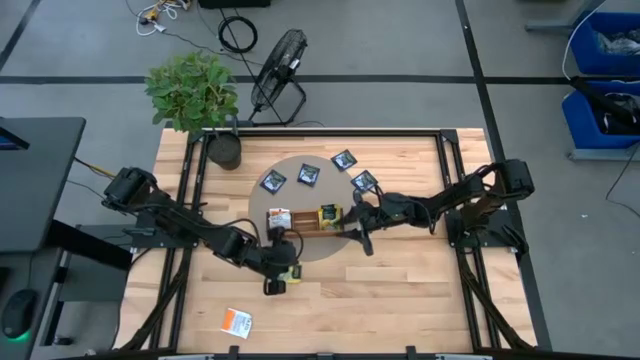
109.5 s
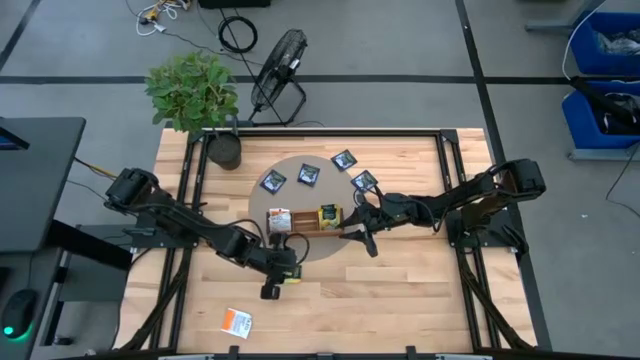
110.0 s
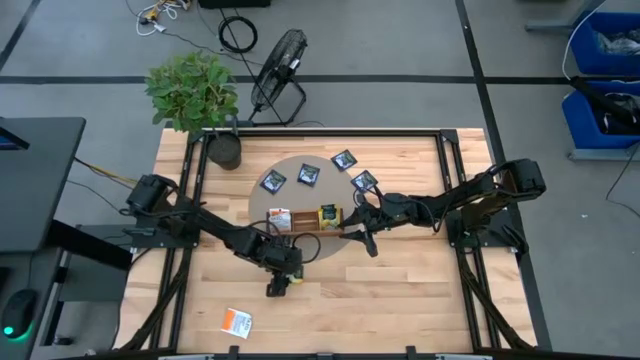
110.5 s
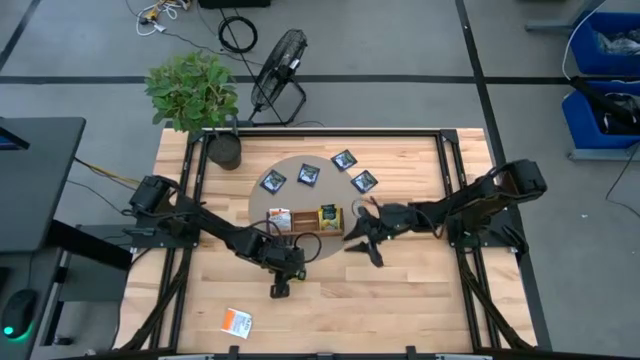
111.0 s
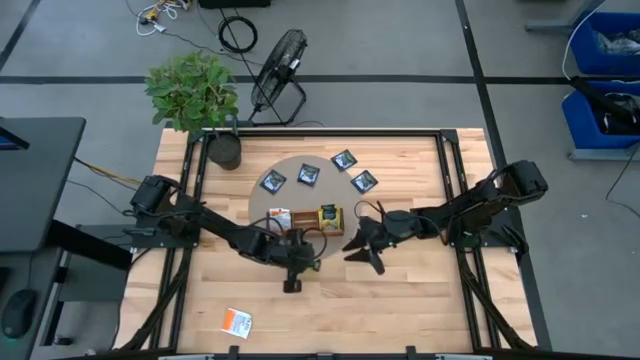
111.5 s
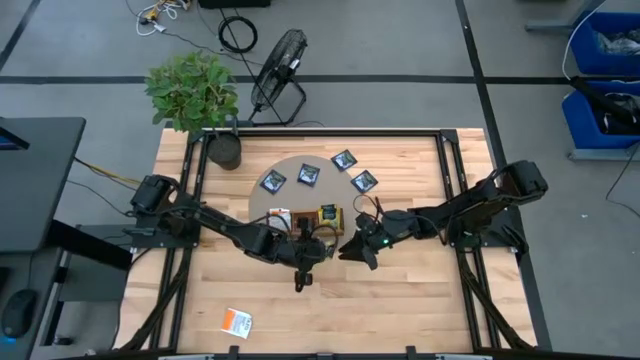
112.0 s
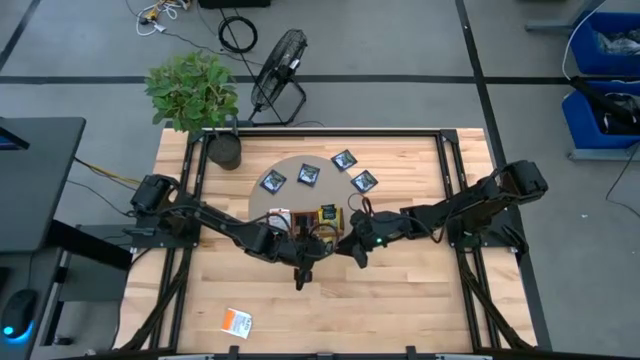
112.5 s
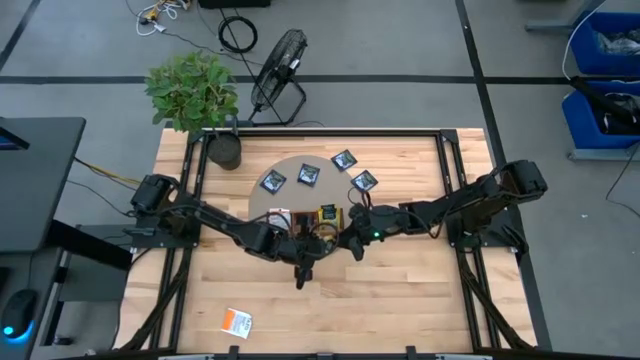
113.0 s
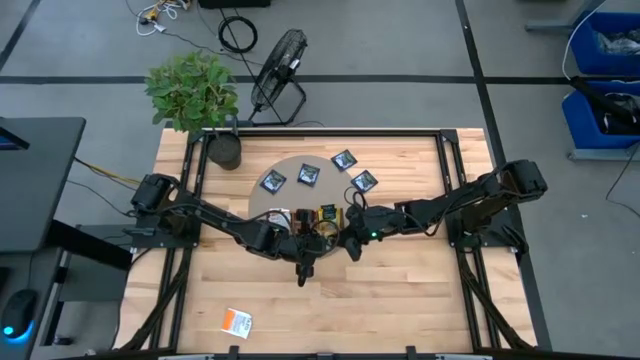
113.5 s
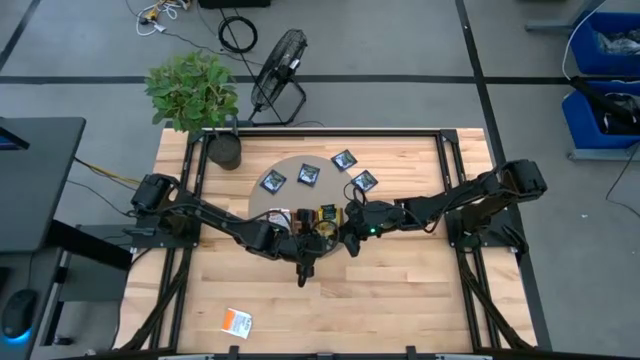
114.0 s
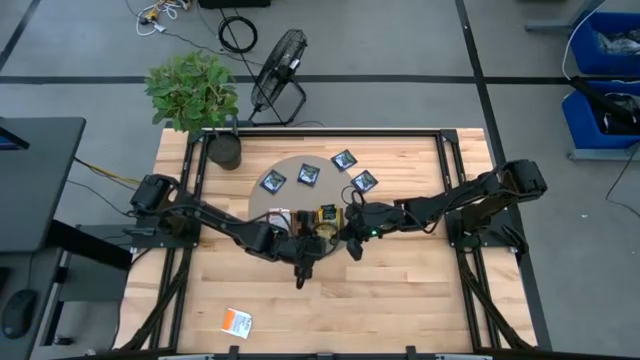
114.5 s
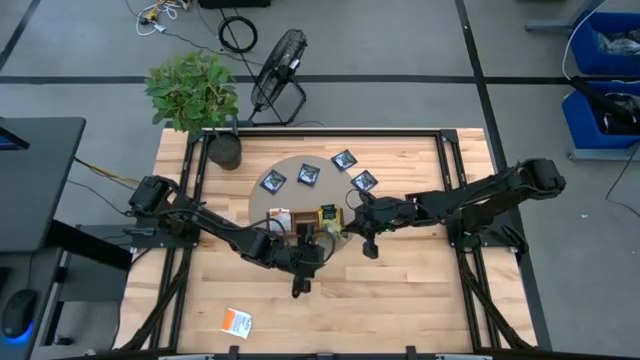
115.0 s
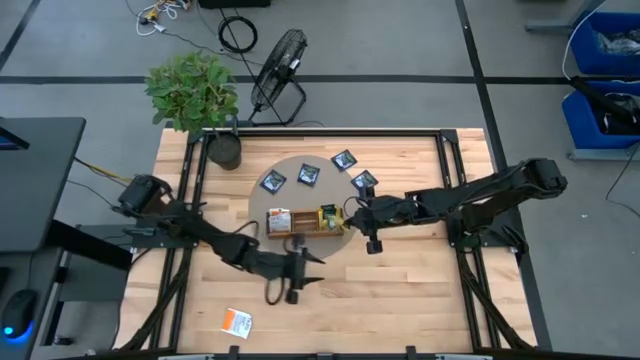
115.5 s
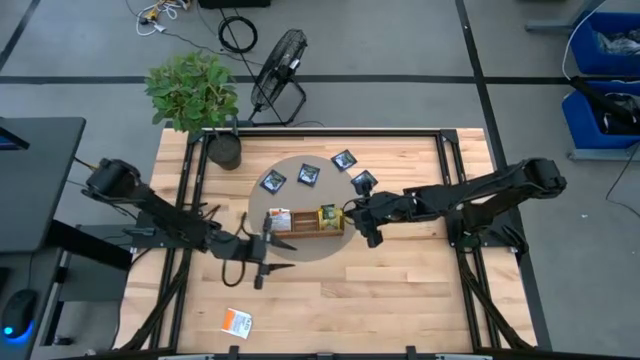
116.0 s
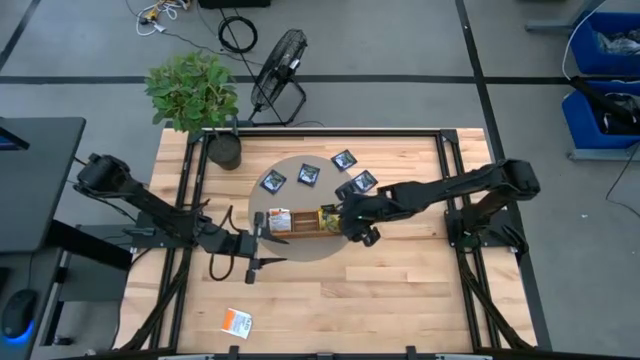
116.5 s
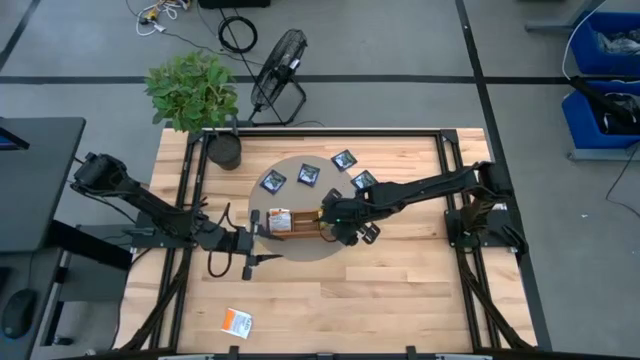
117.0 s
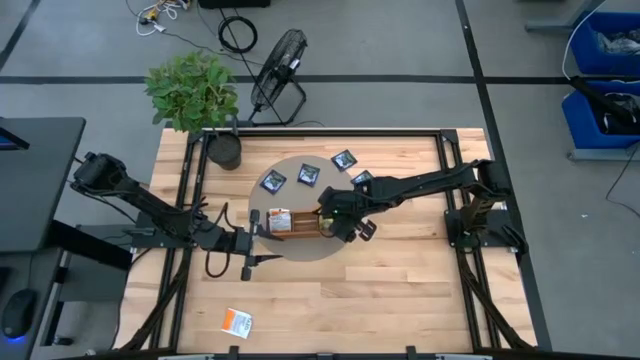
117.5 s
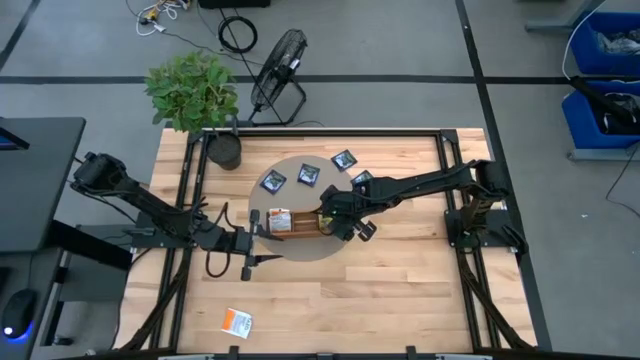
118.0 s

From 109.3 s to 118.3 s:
Task: Pick & Place Tea
Put the yellow tea bag into the right compartment of the wooden organizer

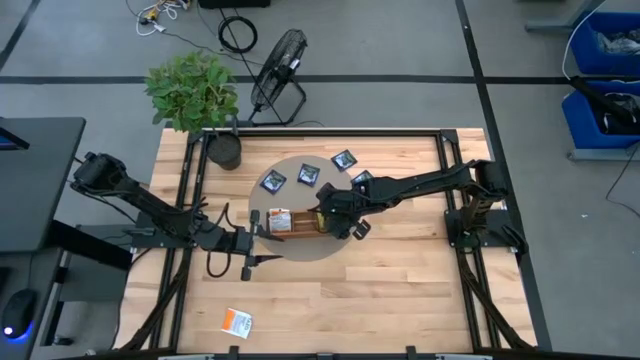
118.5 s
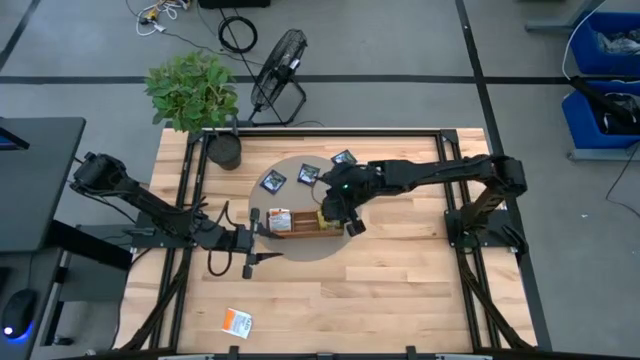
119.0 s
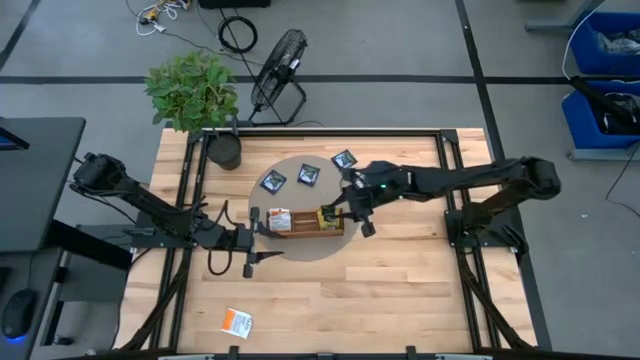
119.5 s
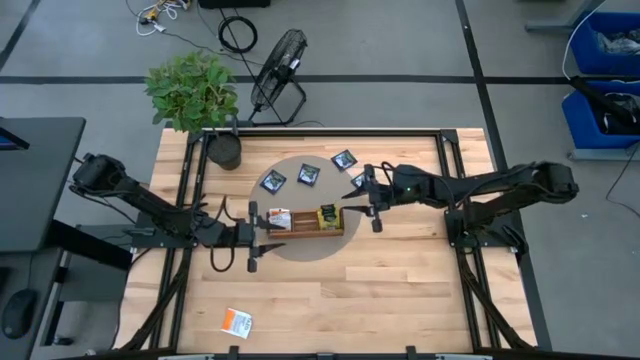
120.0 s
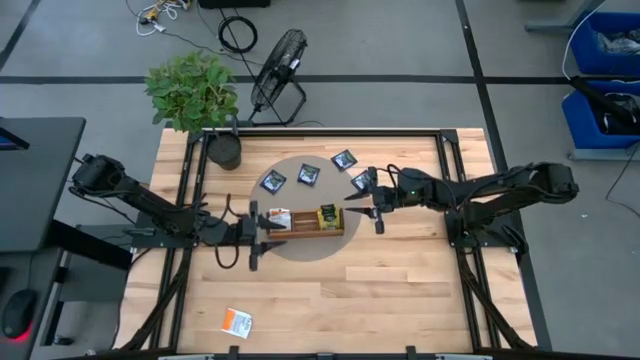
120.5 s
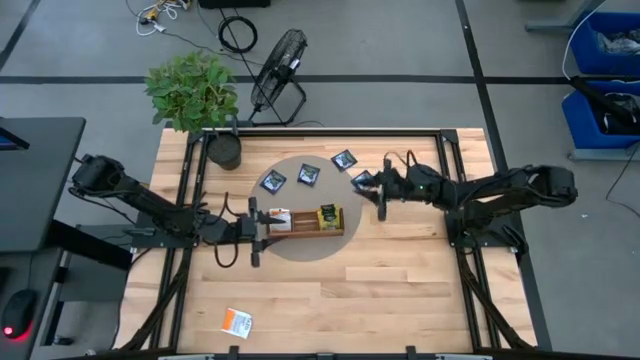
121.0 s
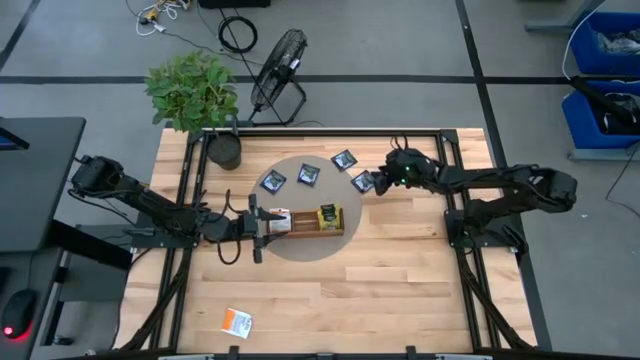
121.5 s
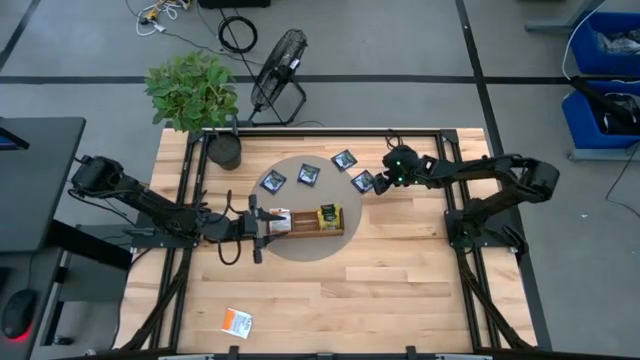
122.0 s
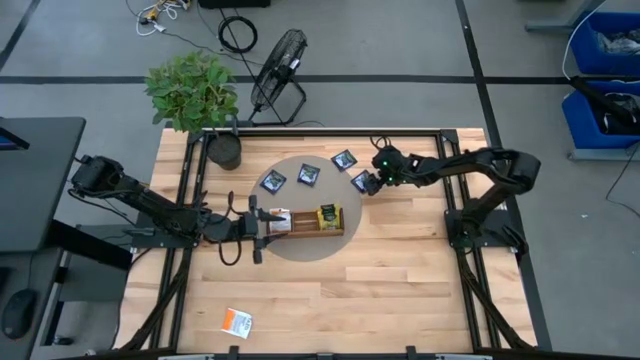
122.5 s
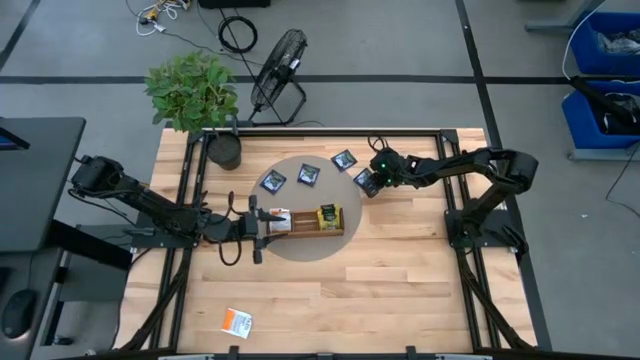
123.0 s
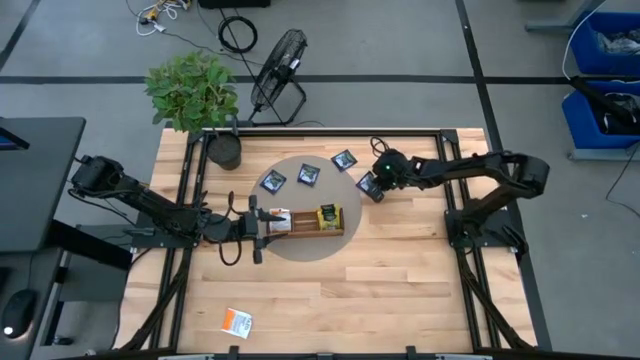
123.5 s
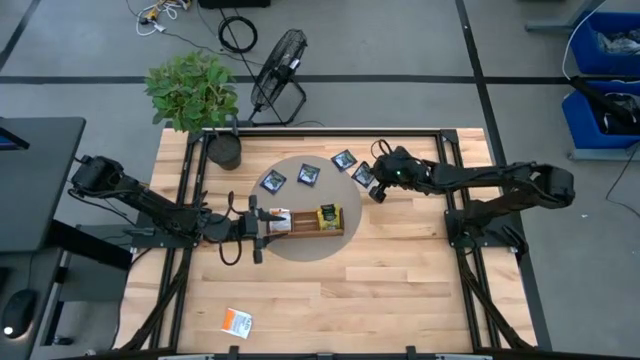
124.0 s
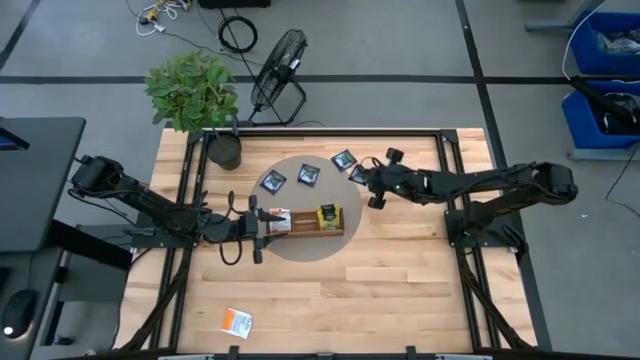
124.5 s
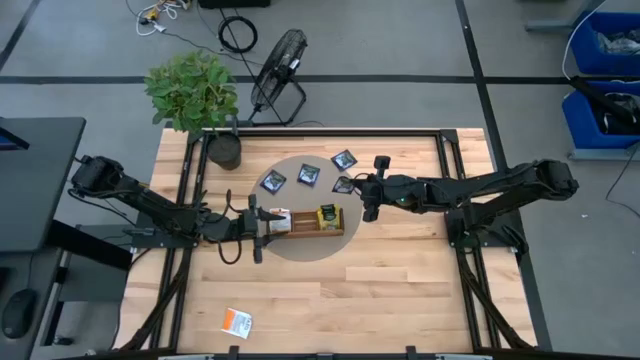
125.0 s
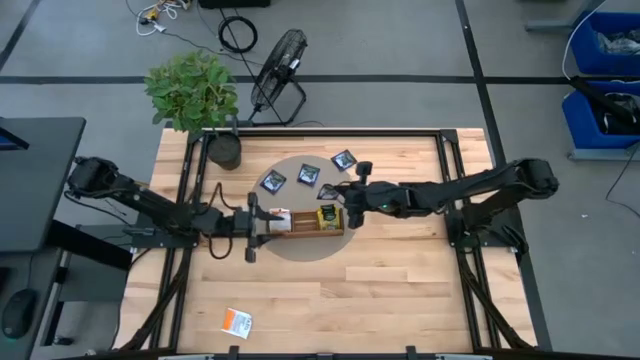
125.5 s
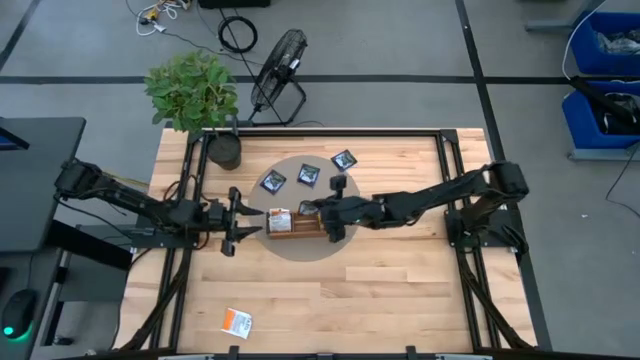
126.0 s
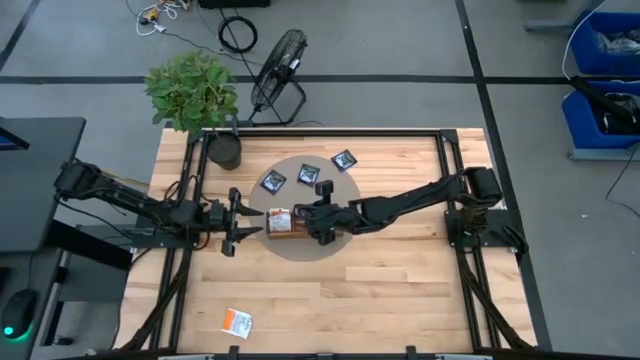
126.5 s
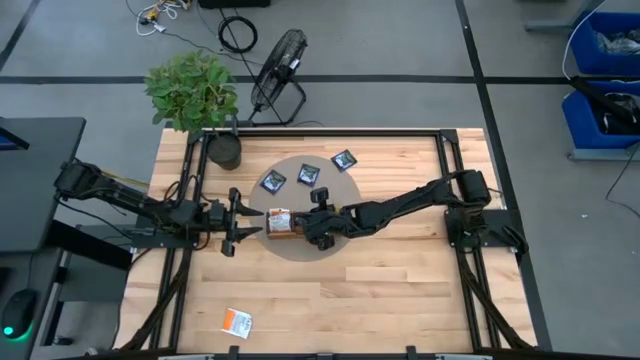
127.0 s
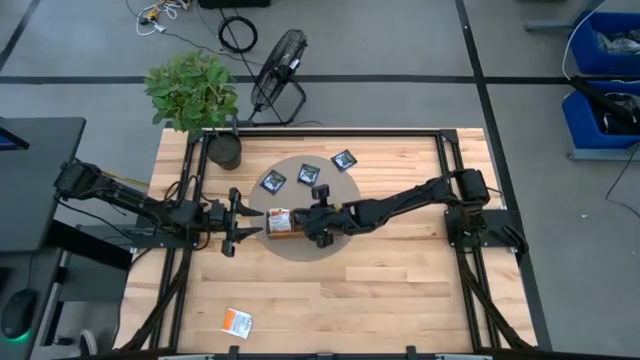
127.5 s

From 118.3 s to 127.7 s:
Put the purple tea bag into the middle compartment of the wooden organizer

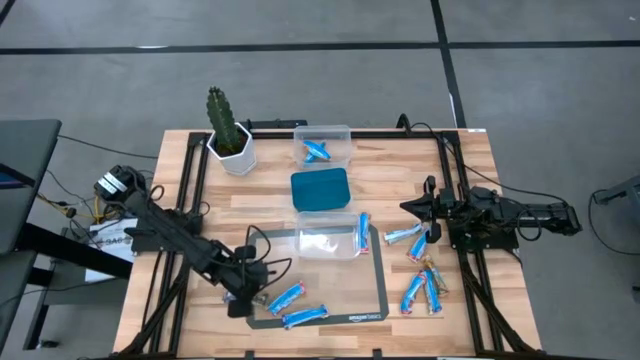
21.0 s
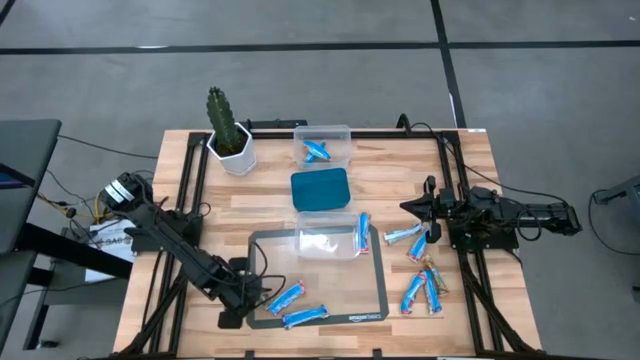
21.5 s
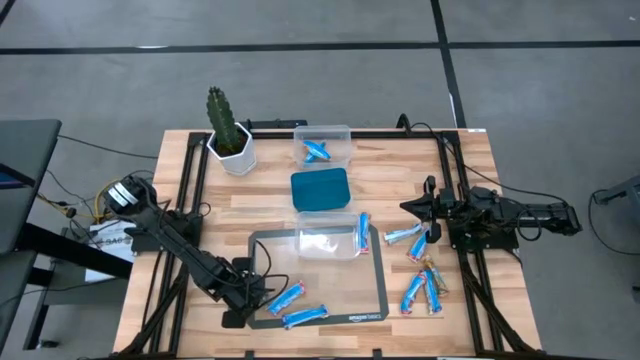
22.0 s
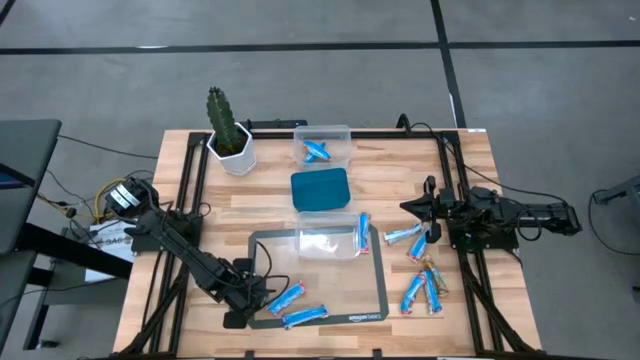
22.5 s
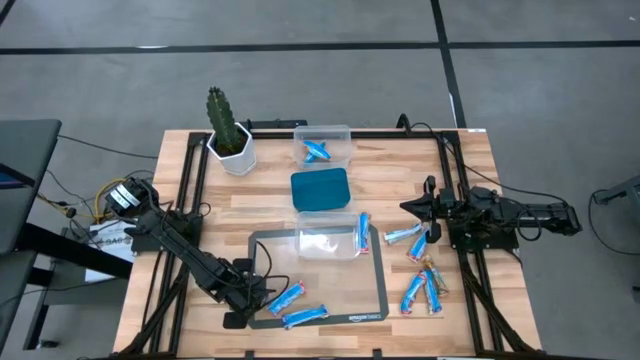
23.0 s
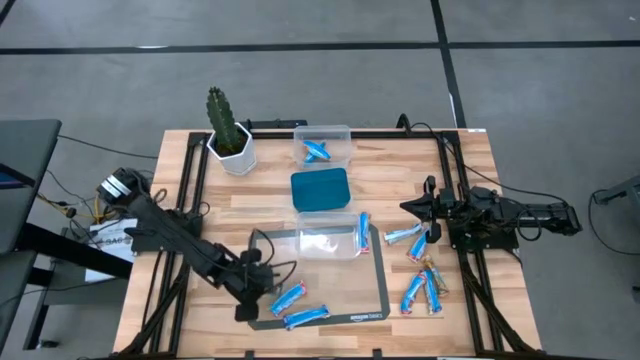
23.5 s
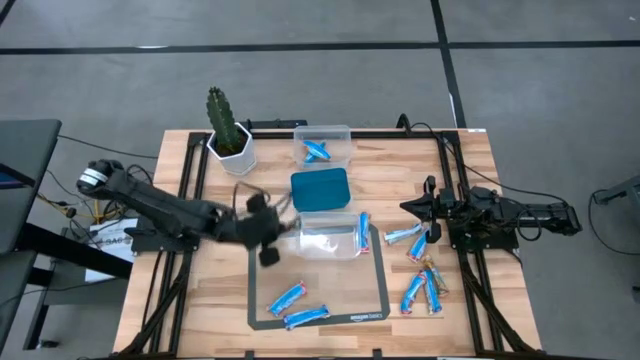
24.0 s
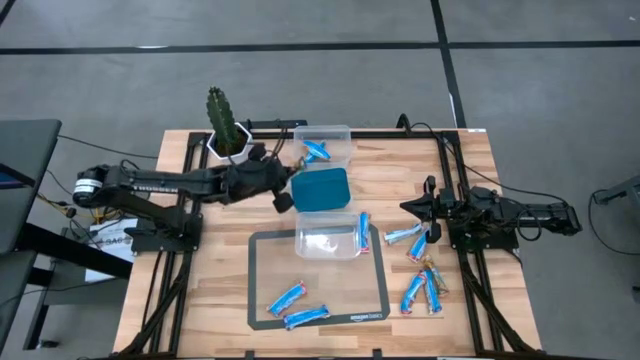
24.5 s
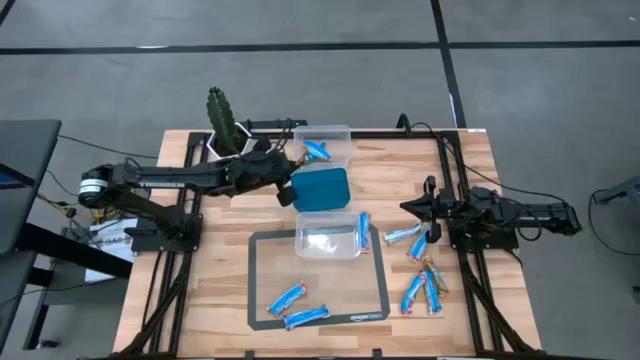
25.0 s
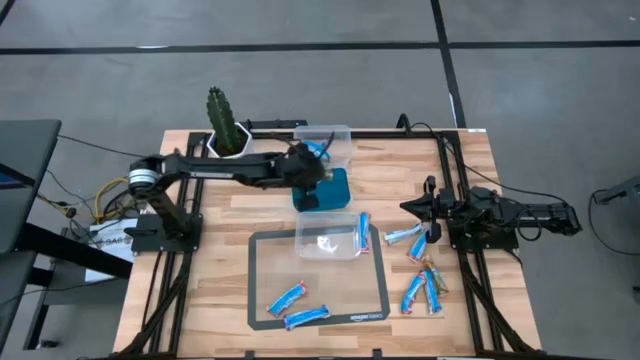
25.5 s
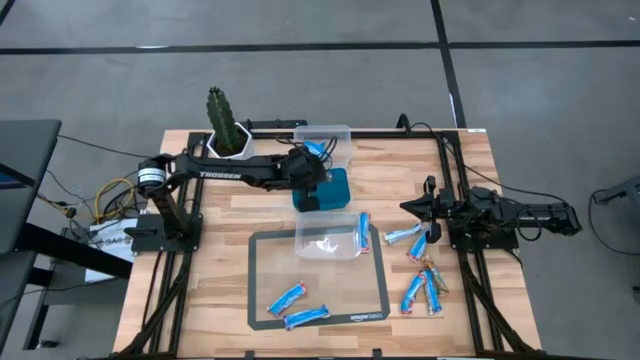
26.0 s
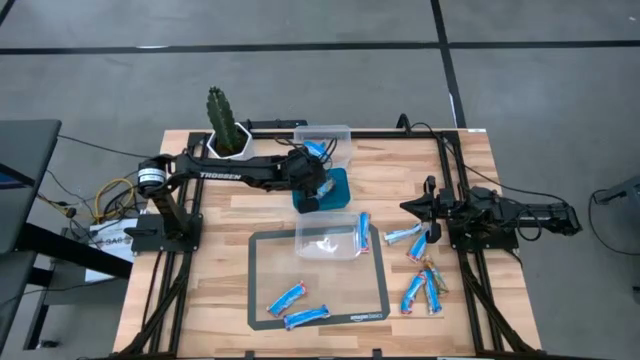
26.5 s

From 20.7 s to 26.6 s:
Task: Pick and place Granola Bars by type
Put the left blue granola bar into the blue bin
